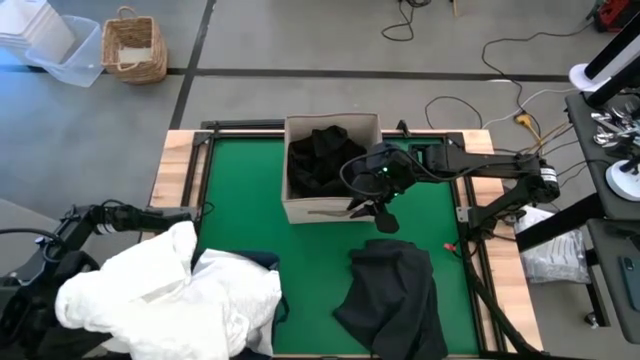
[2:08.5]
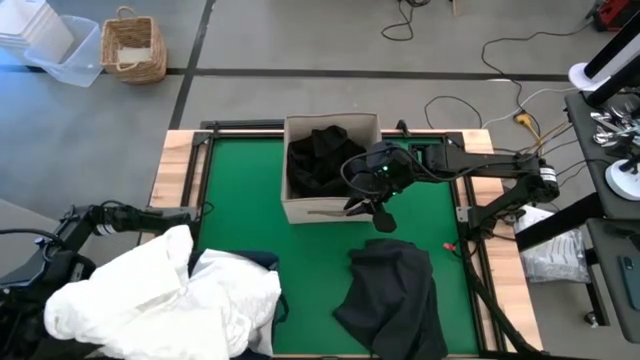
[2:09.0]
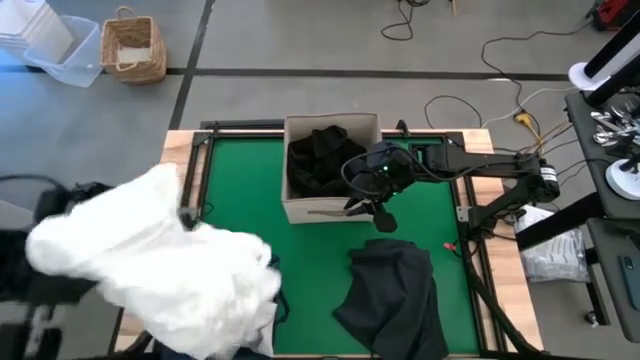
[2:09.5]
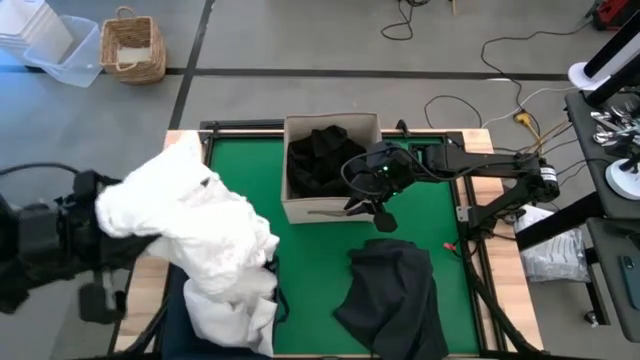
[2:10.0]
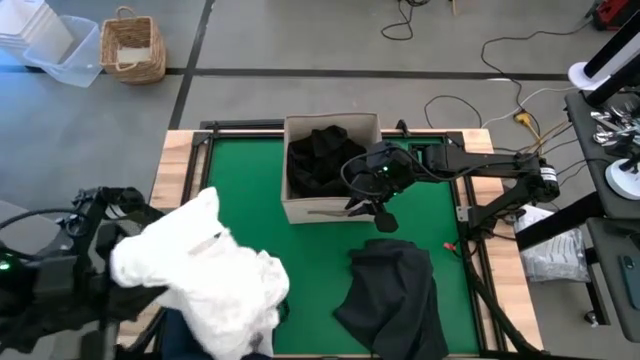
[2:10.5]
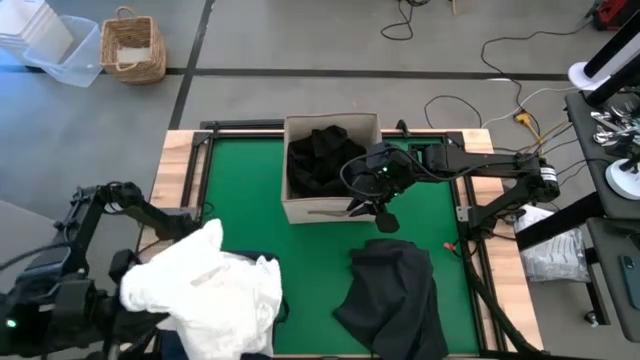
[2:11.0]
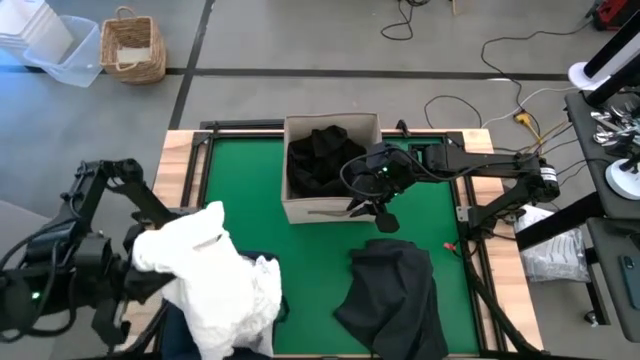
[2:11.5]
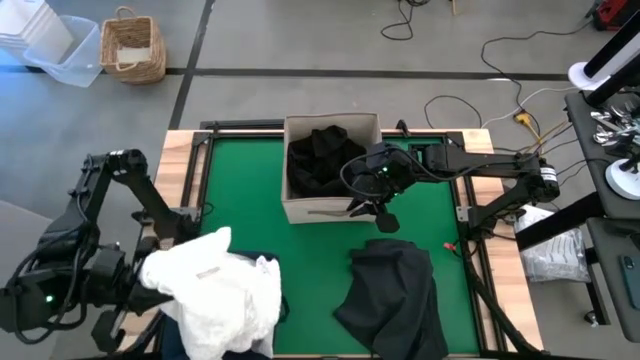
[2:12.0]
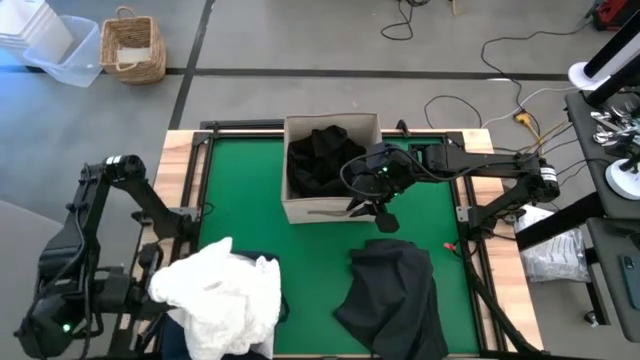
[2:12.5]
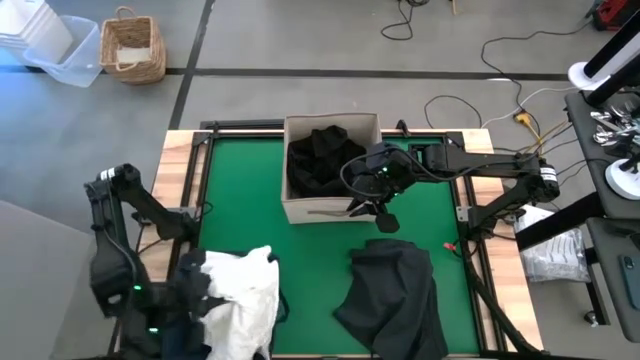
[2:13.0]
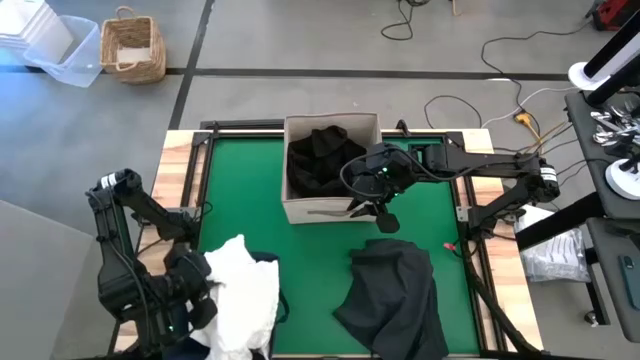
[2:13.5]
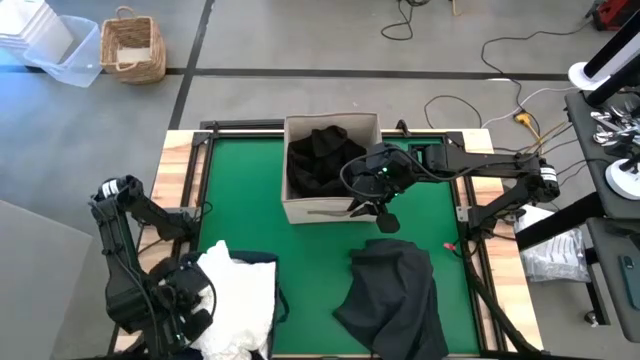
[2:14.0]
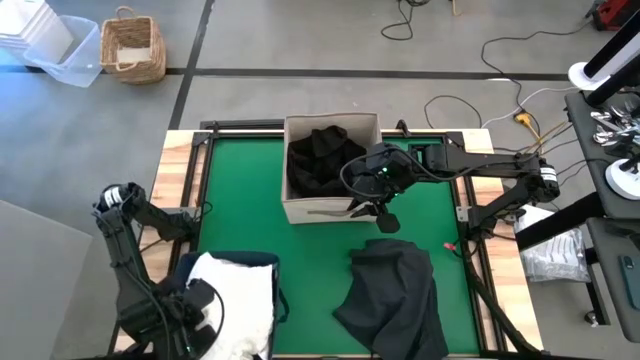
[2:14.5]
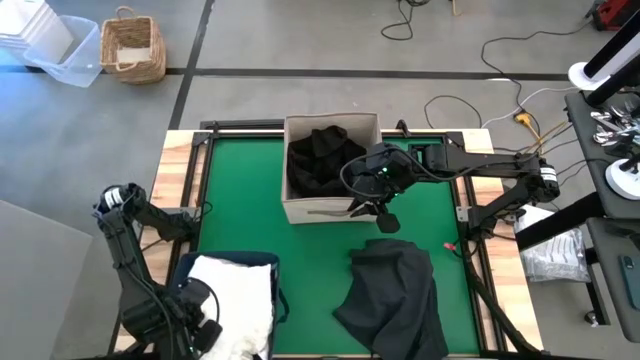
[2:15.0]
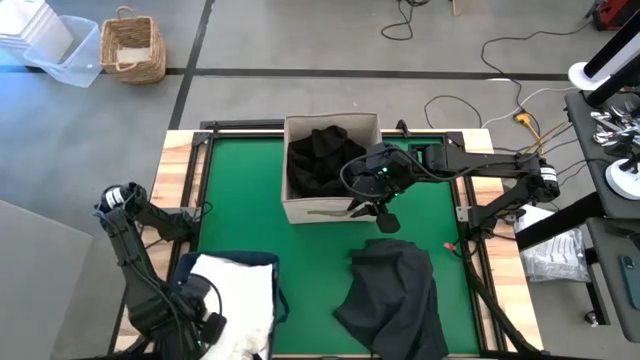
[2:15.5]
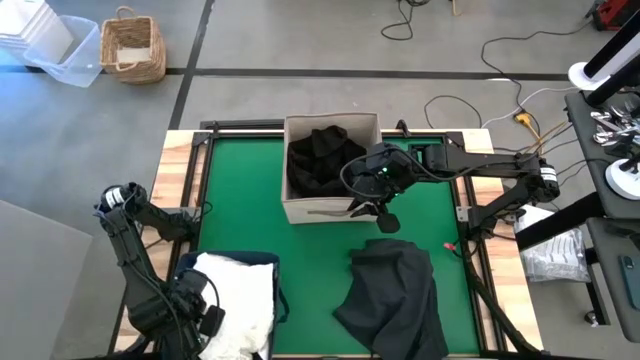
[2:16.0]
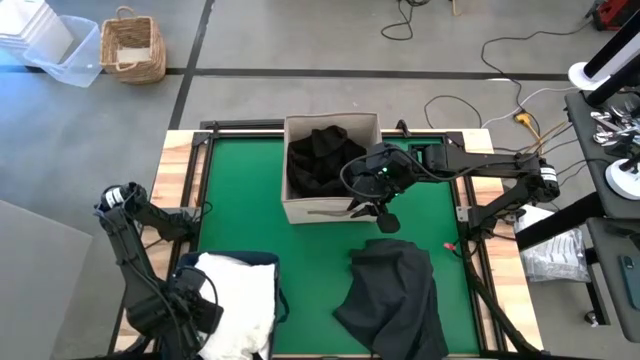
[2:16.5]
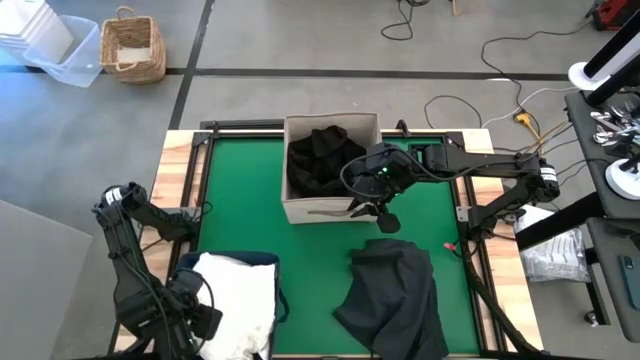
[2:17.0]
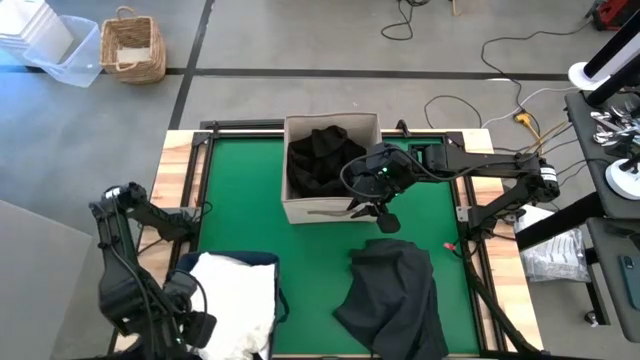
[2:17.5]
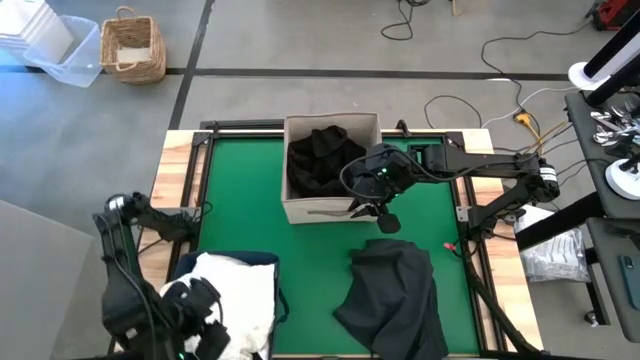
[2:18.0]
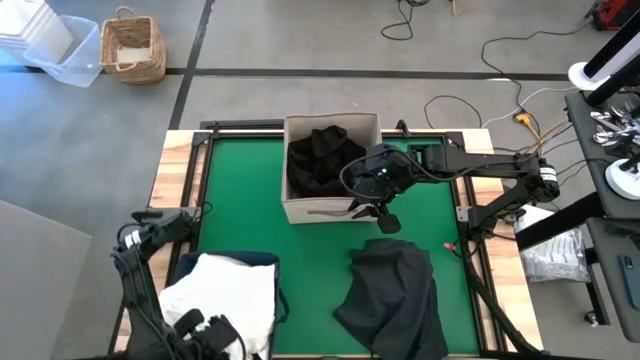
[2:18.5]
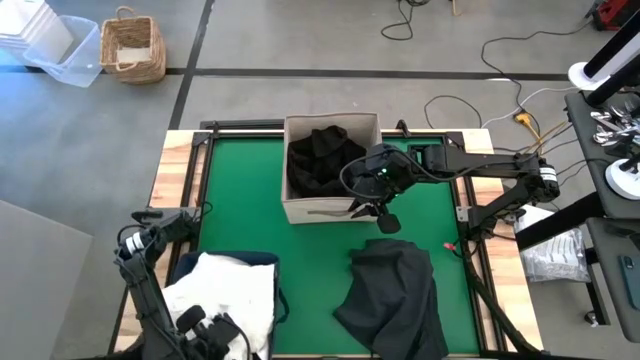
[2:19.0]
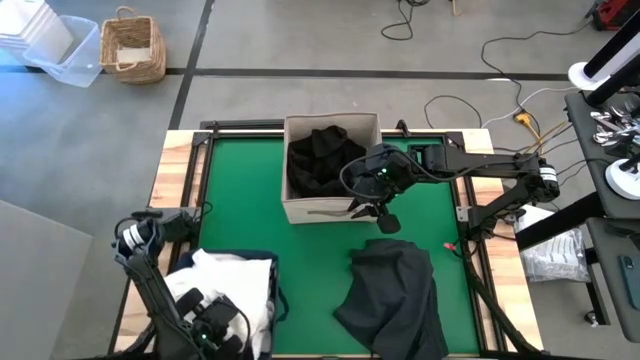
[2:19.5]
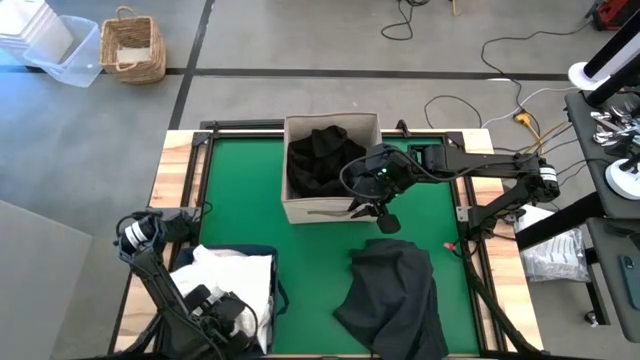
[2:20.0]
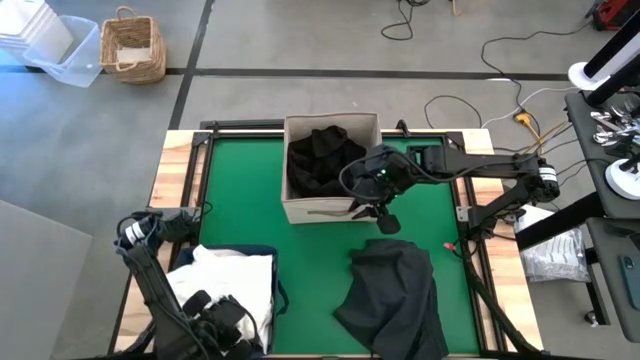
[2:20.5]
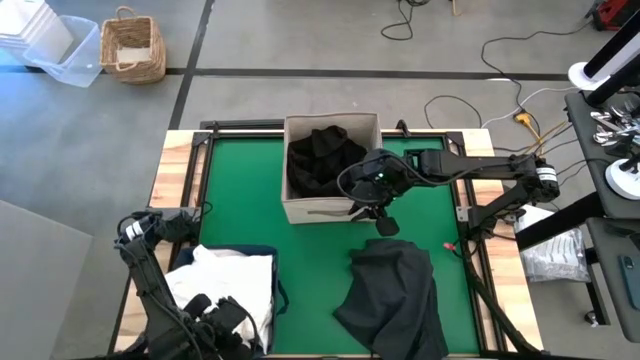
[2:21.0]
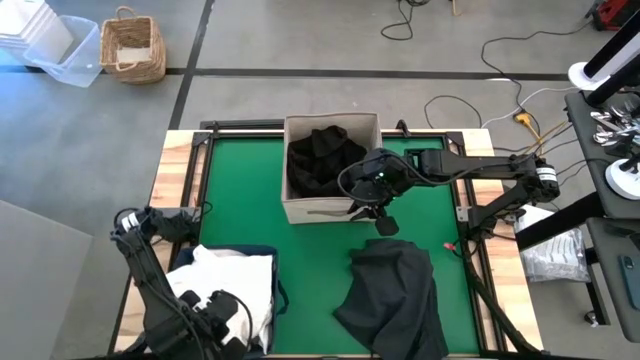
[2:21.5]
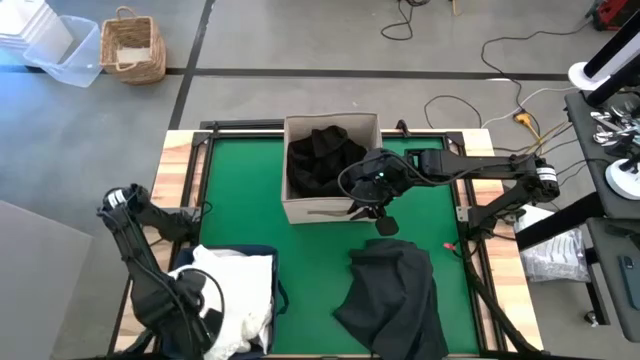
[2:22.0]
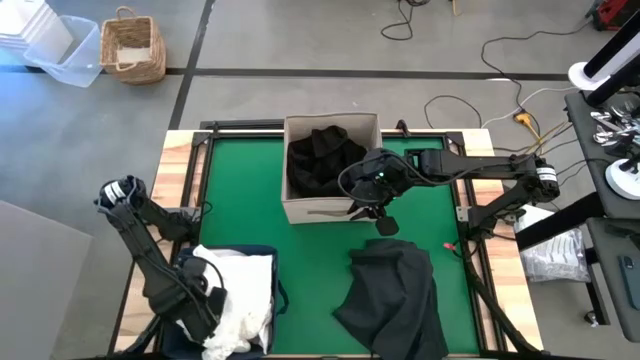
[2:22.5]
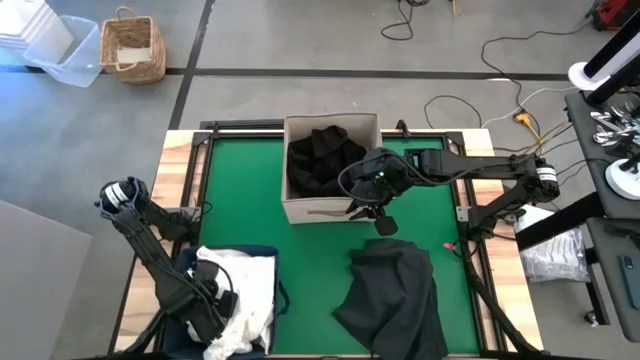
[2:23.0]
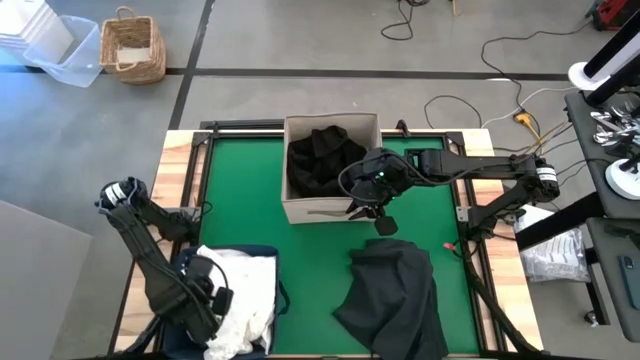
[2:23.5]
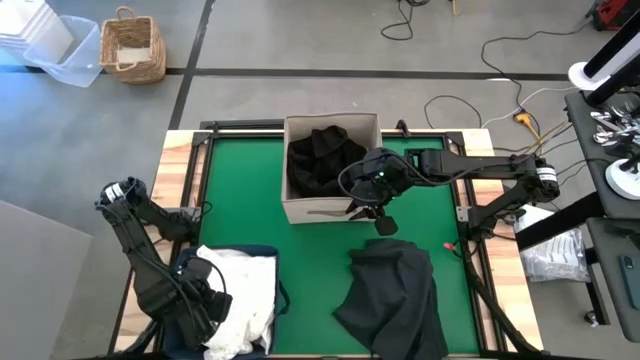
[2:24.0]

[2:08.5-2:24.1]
Put the white dress into the blue laundry bin

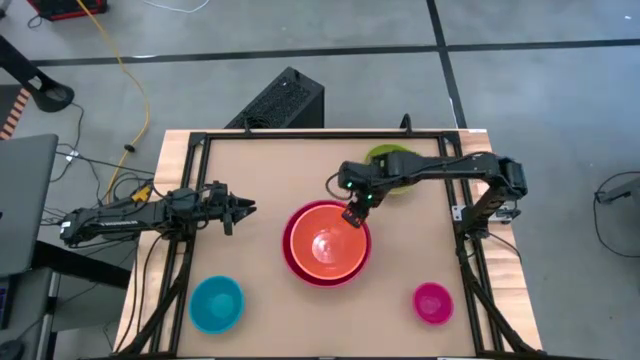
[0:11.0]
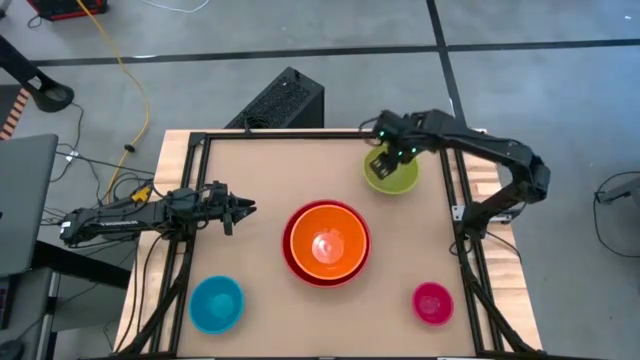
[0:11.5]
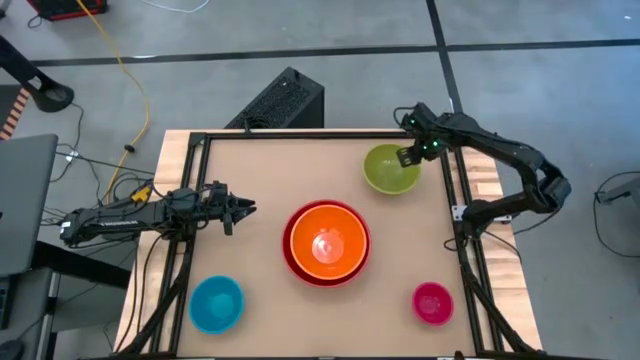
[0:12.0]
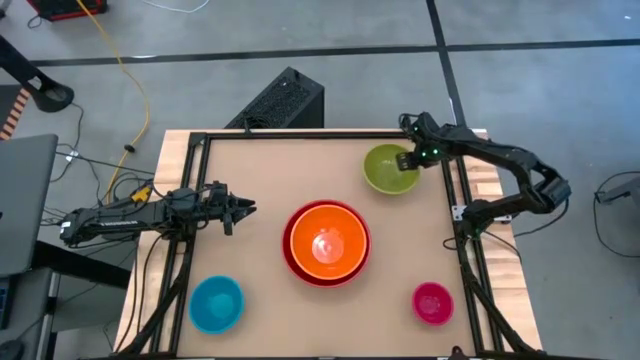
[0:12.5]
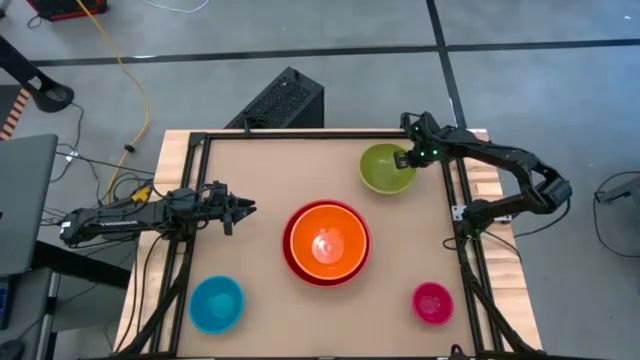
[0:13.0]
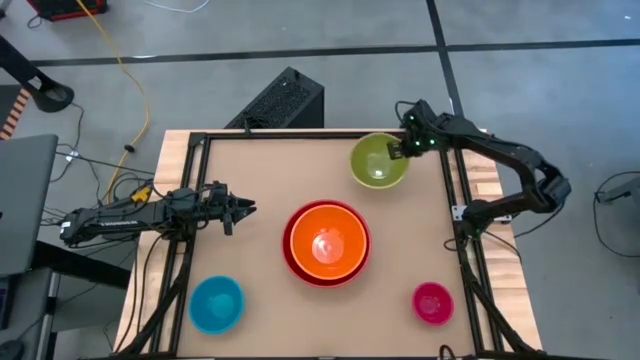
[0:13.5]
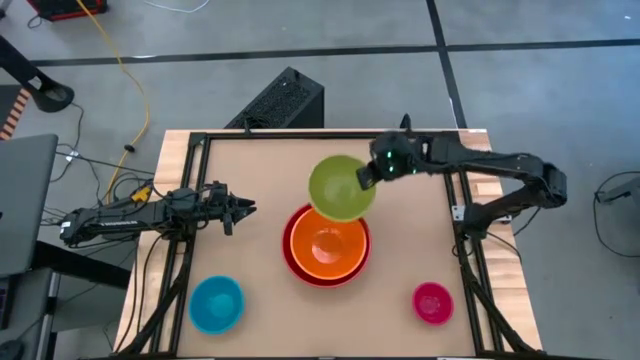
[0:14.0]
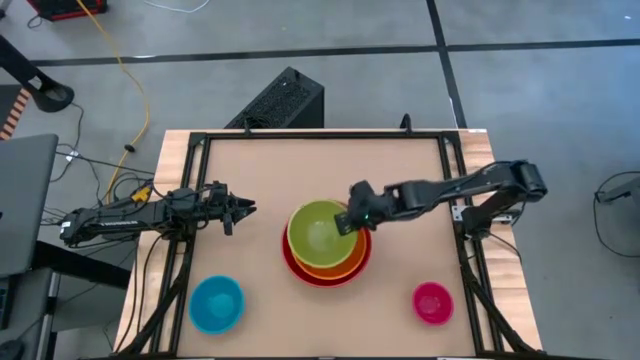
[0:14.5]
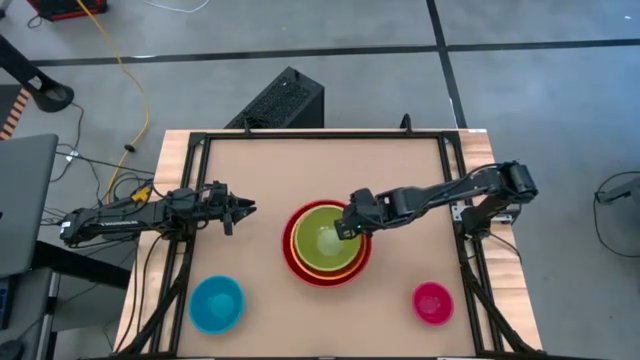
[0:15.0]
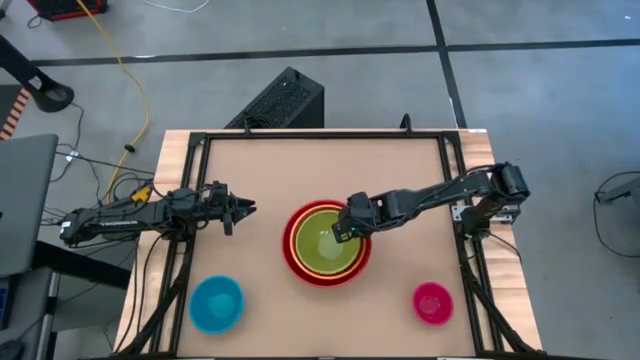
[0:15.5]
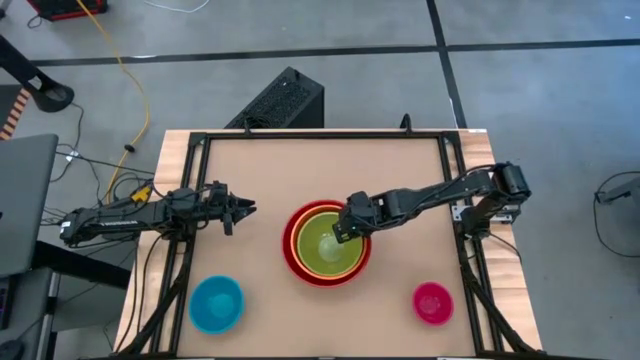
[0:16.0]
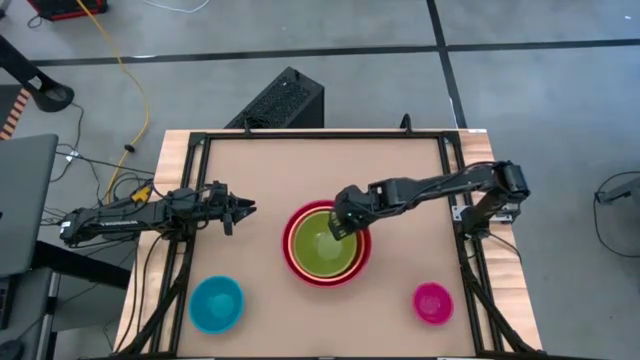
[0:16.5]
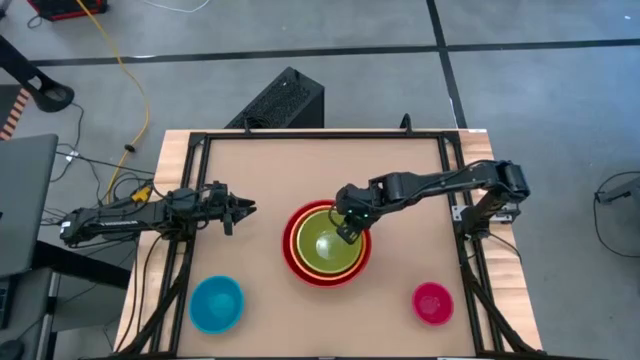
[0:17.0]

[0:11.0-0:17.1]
Stack the green bowl on top of the orange bowl
